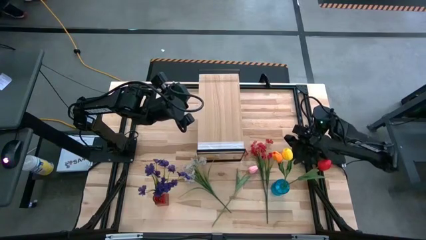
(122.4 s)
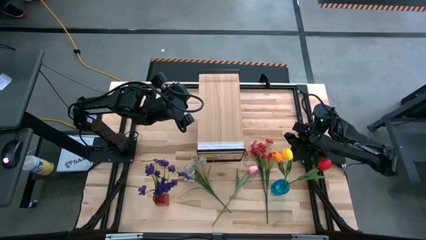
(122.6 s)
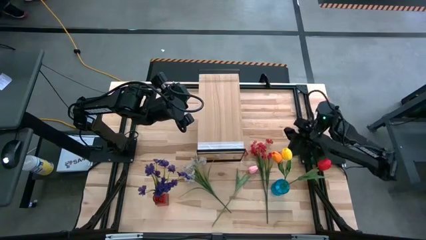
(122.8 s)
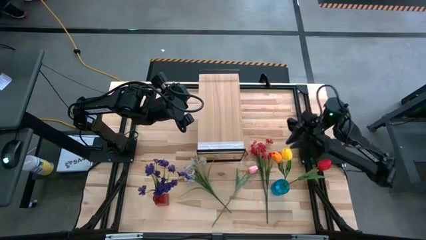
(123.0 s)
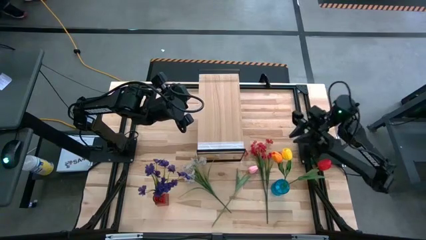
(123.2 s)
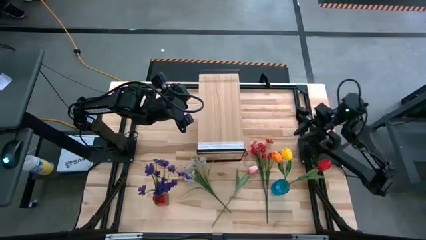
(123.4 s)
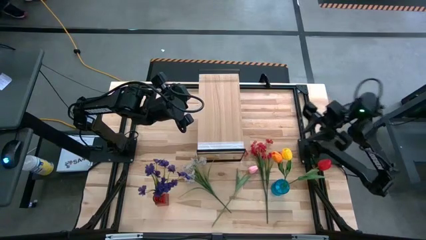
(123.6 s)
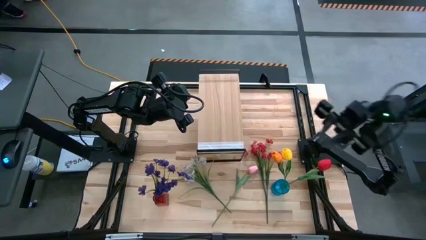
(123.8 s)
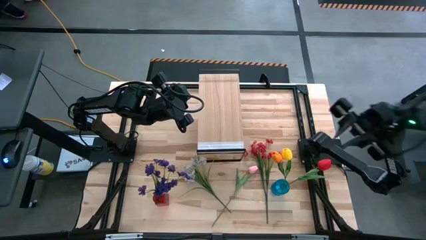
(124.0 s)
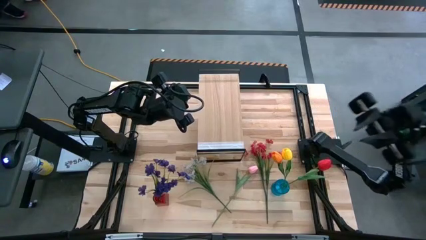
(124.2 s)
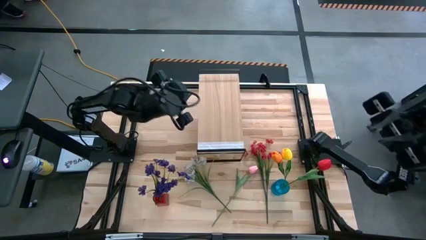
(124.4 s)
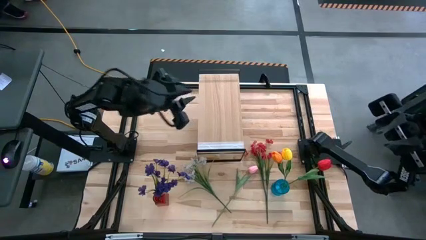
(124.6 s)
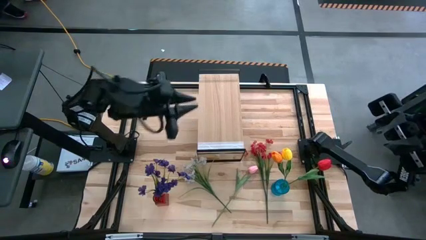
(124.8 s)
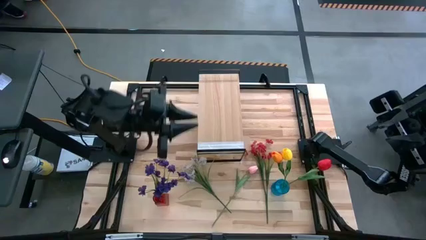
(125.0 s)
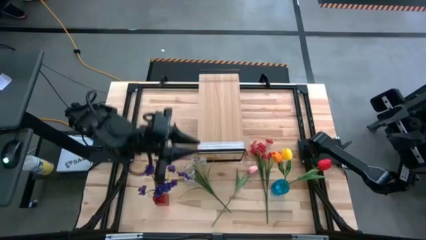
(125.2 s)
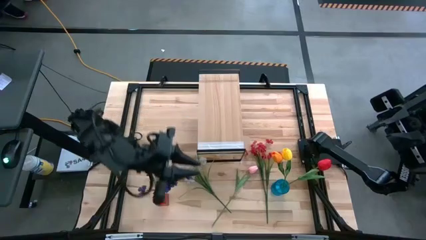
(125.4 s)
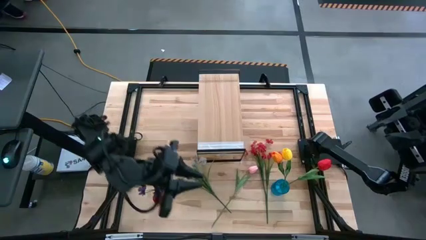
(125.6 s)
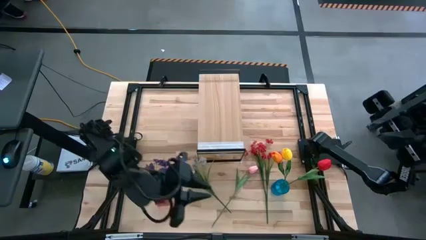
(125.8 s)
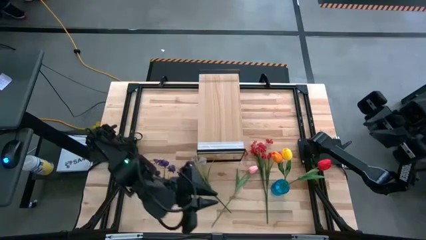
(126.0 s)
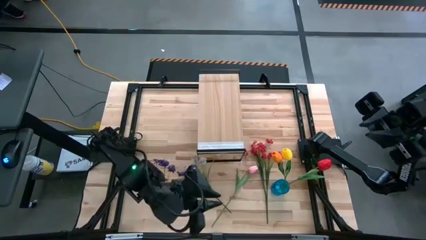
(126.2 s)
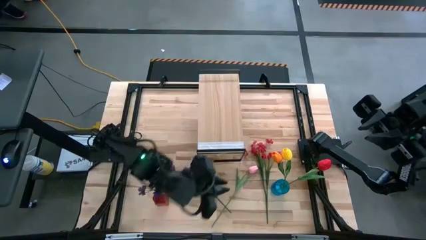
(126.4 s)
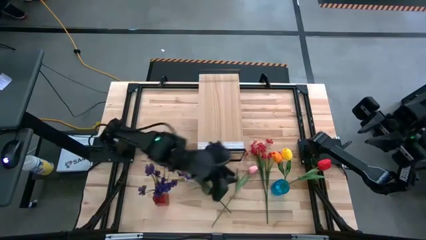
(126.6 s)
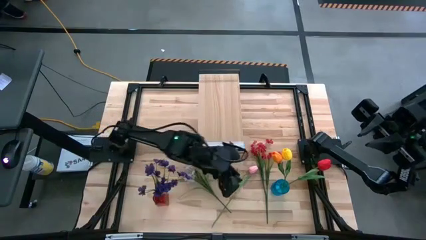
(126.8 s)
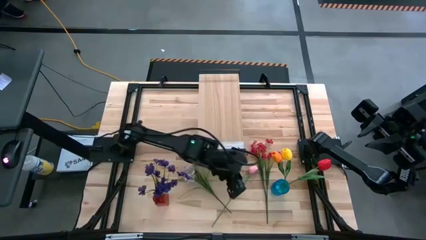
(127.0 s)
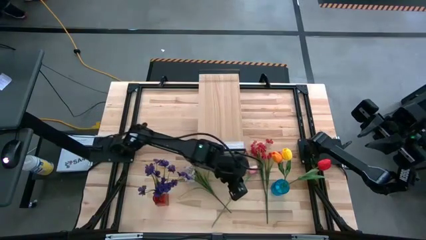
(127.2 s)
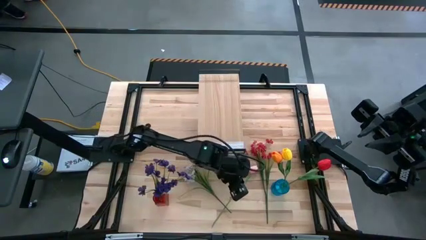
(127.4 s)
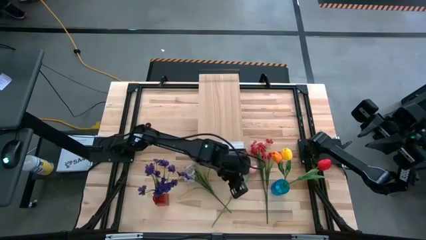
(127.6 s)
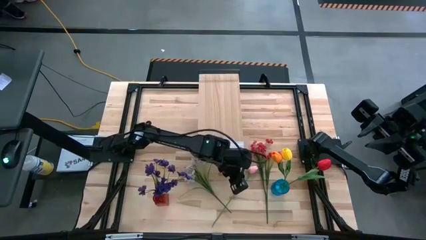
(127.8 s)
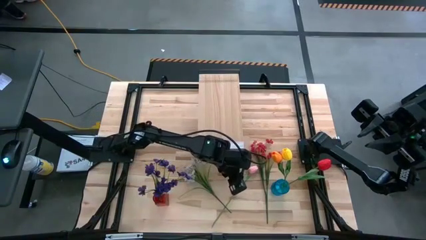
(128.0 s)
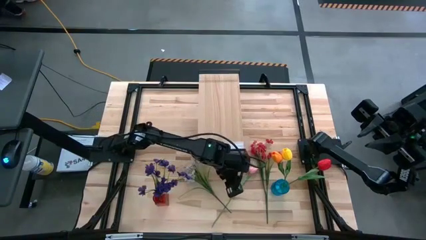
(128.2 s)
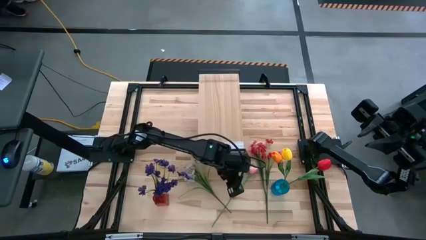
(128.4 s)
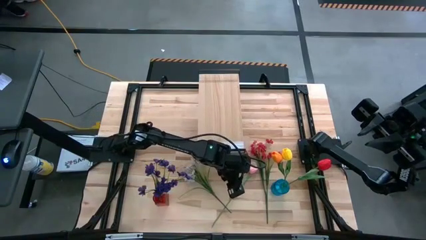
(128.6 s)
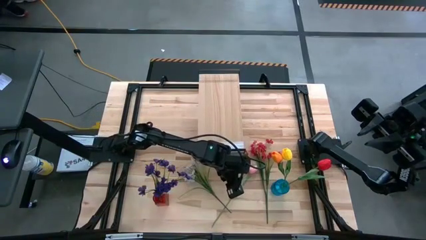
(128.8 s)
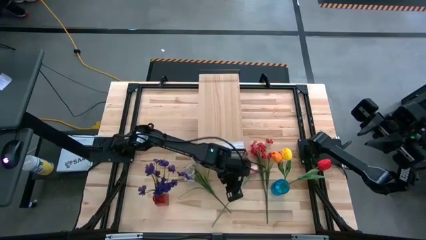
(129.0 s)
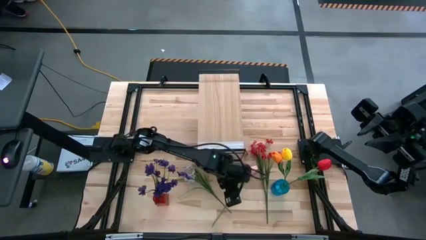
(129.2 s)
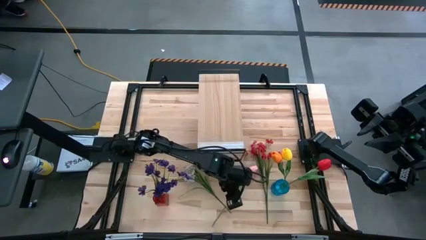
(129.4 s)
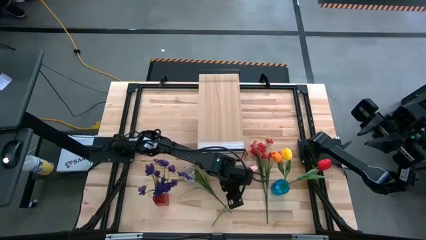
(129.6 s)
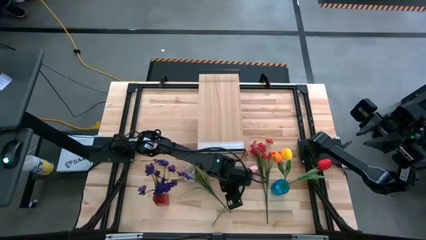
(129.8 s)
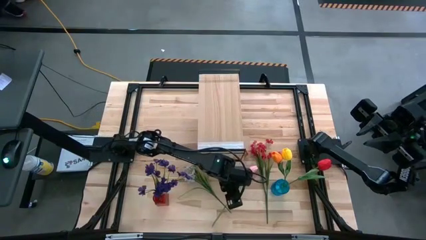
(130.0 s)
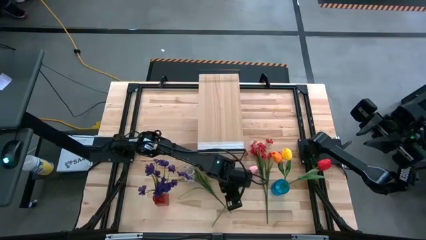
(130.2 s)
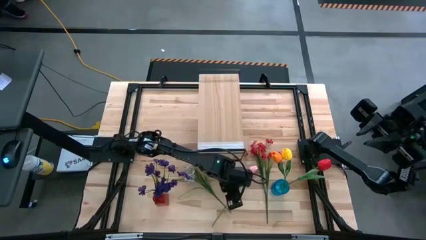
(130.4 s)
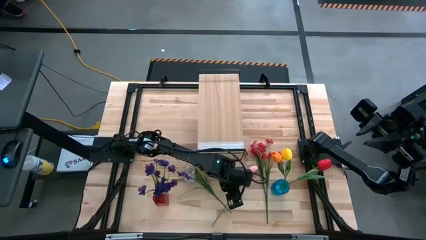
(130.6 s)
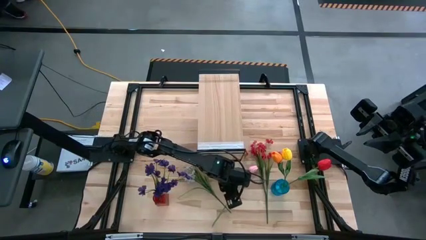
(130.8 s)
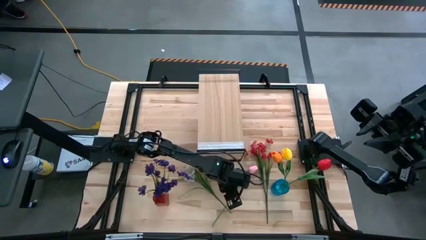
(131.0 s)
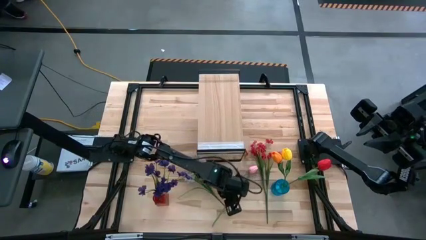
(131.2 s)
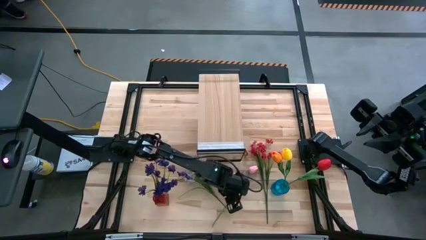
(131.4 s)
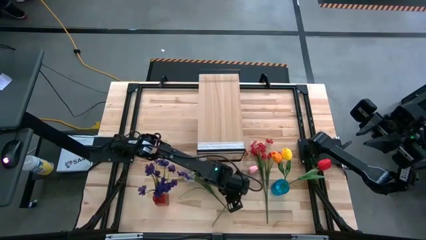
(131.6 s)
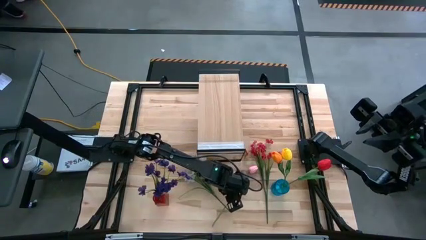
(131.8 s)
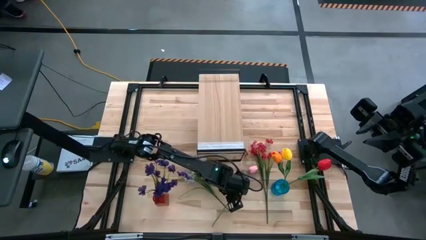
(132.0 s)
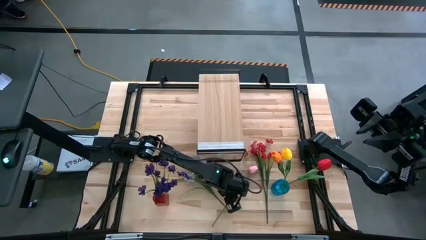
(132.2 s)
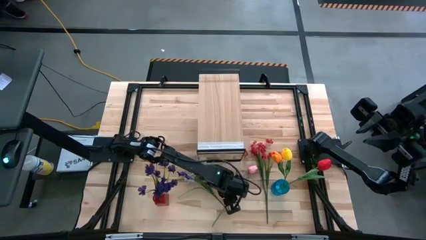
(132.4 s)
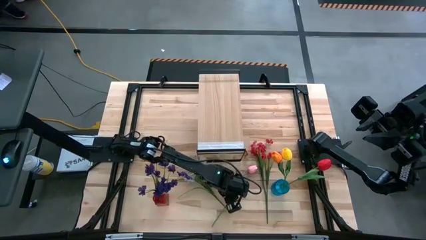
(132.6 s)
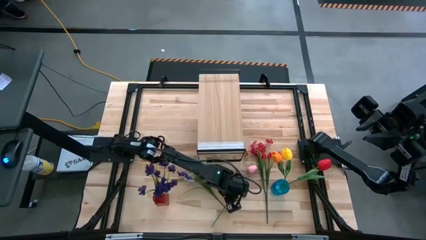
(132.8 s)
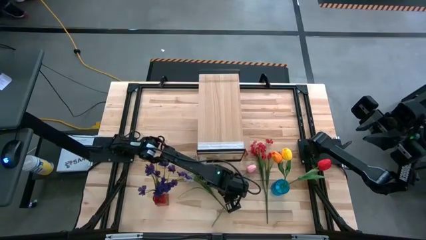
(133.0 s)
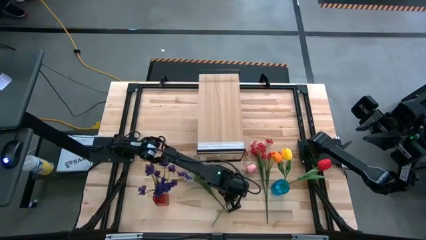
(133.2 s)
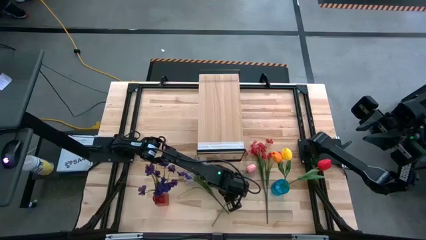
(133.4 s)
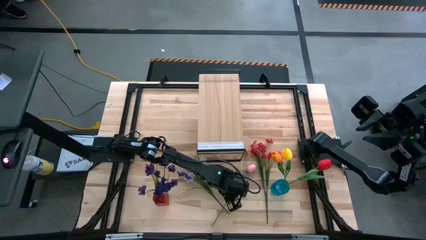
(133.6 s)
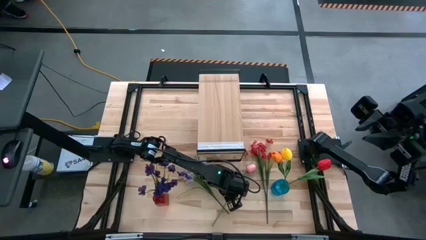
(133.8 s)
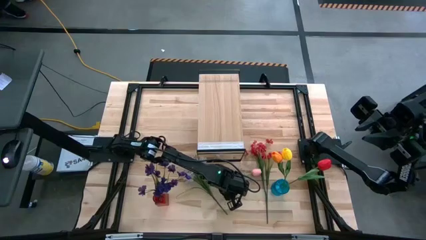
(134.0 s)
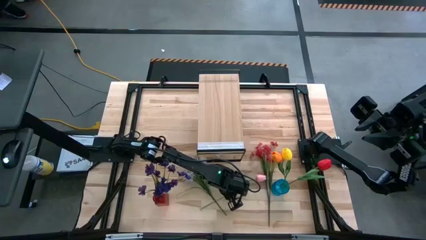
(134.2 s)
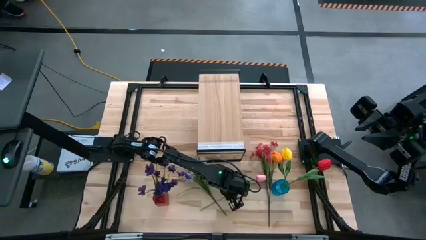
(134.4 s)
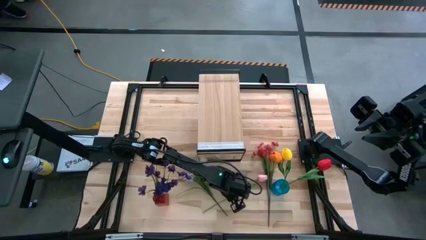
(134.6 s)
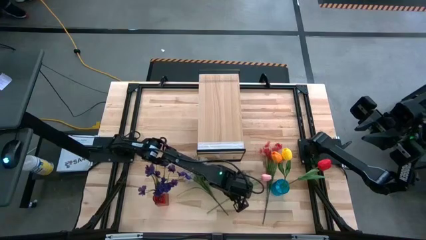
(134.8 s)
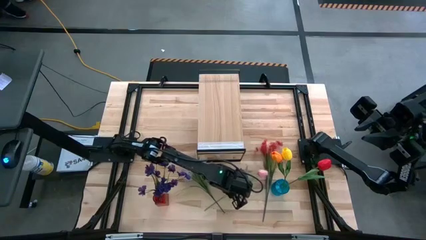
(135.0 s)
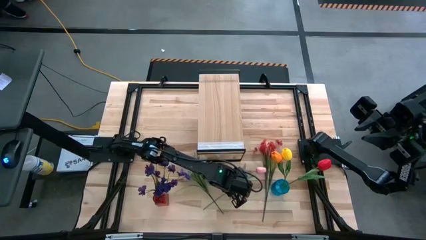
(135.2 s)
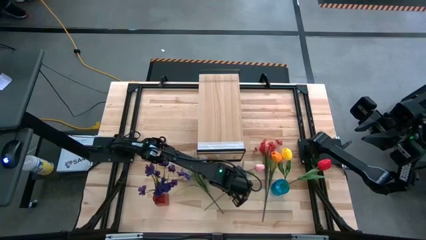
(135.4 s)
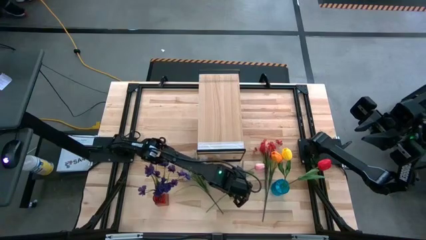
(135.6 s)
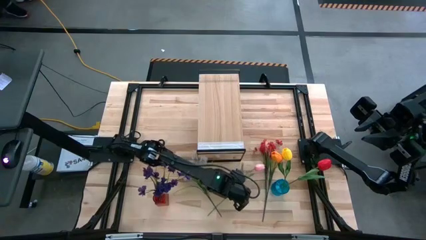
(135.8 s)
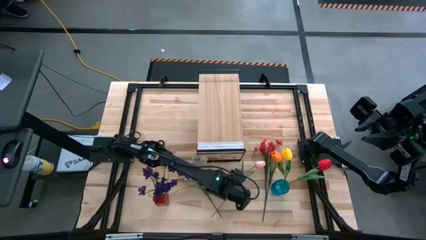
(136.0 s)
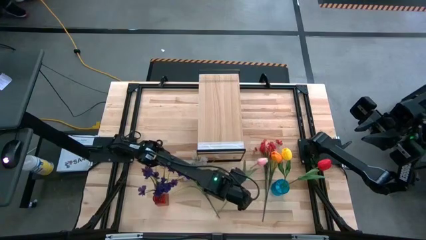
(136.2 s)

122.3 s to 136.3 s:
Task: Pick and place flowers into a vace then onto a shelf
Put the pink tulip into the red vase

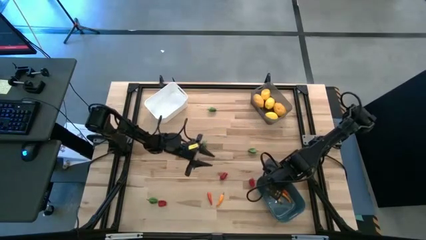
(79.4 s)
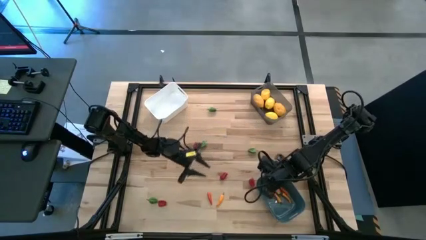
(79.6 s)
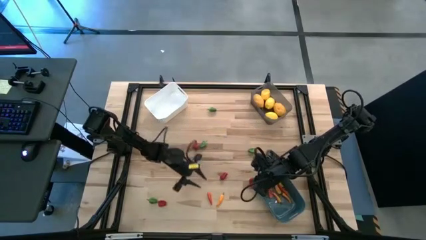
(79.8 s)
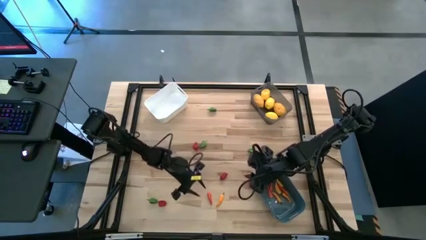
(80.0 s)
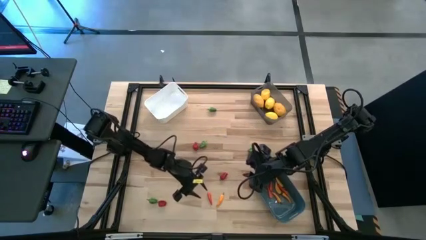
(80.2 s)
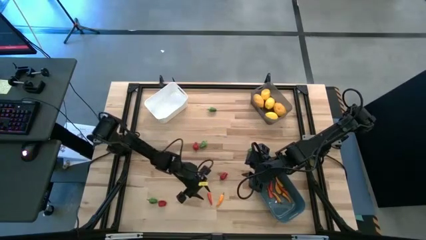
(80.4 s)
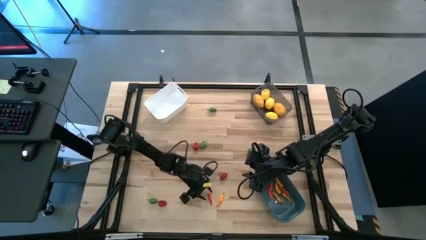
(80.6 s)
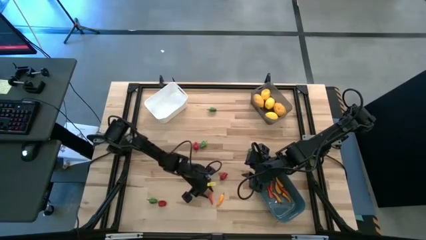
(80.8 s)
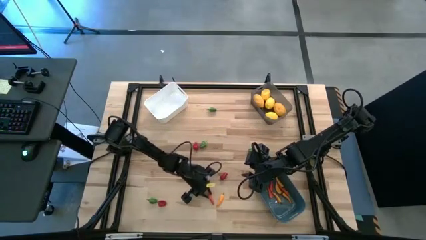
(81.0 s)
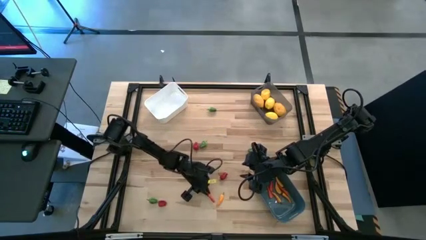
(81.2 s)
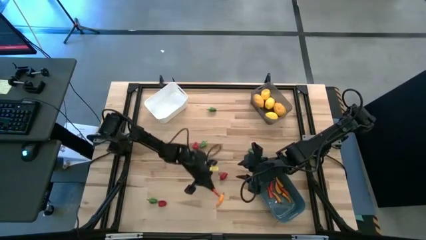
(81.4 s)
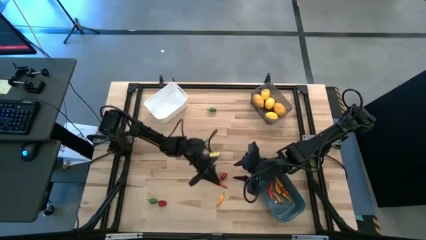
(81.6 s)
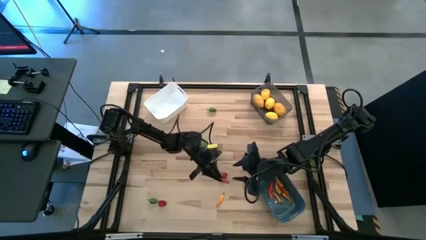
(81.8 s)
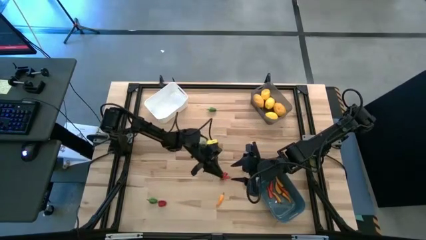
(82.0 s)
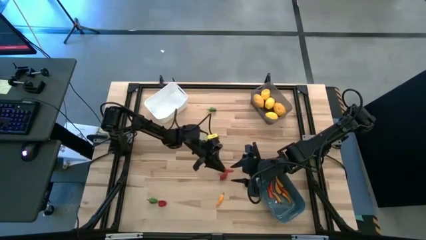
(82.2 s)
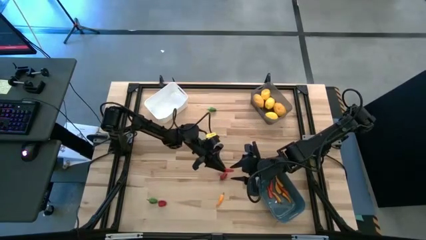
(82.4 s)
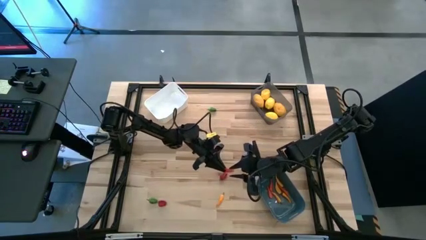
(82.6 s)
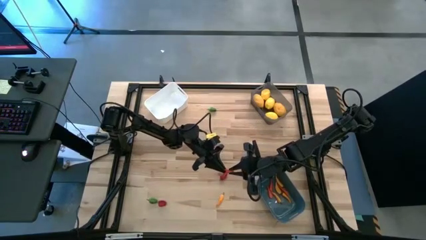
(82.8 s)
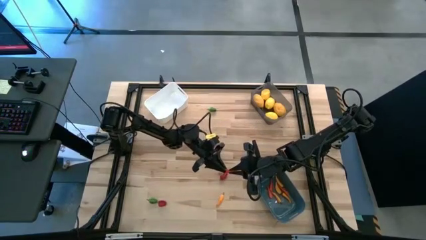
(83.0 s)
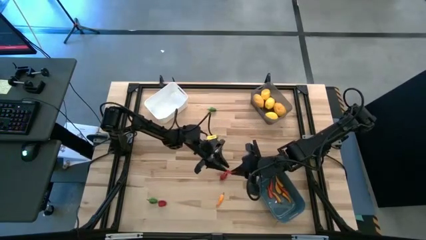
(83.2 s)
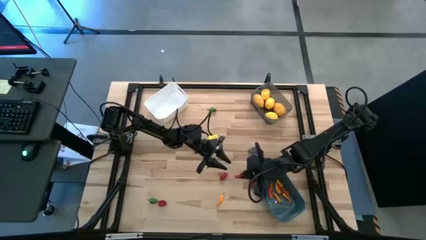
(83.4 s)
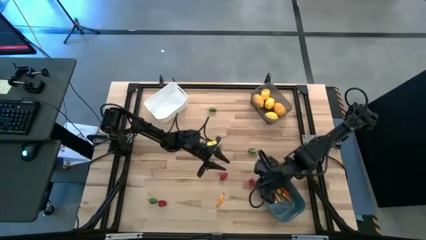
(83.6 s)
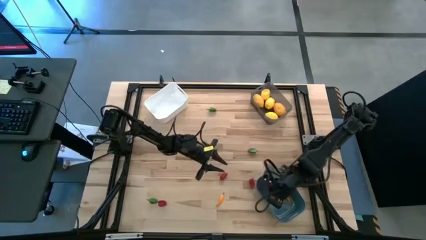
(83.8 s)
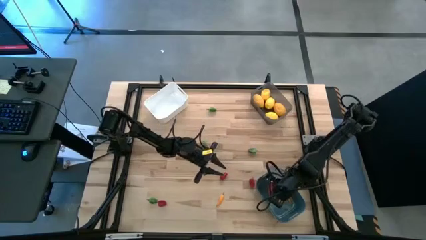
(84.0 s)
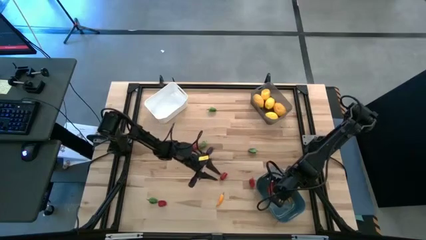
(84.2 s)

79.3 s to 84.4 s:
Task: Sort produce into baskets
Put the orange chili pepper into the blue bin
